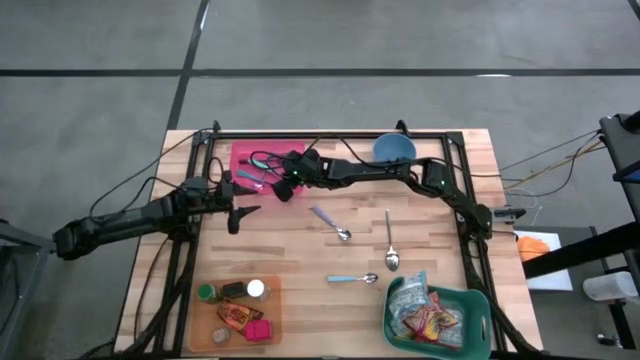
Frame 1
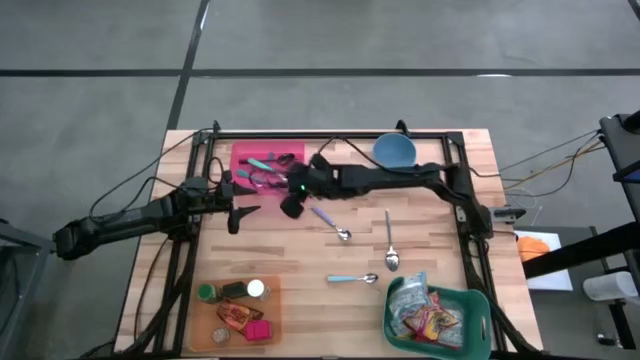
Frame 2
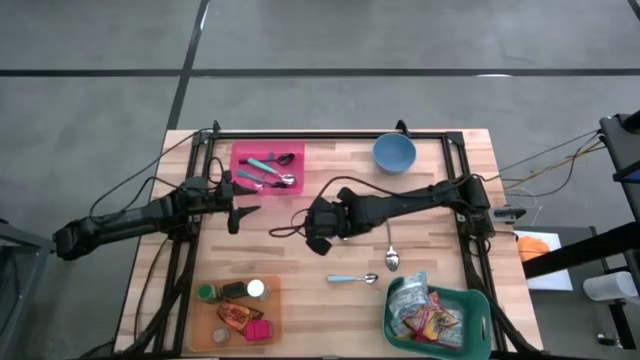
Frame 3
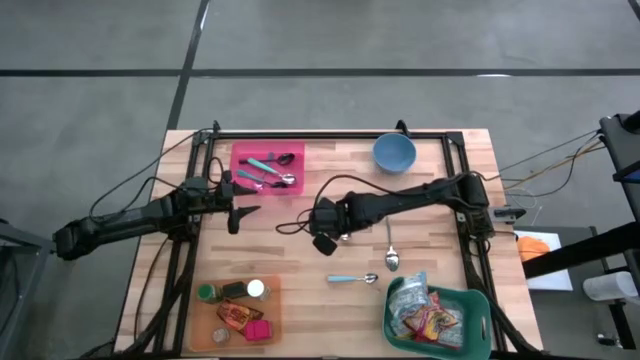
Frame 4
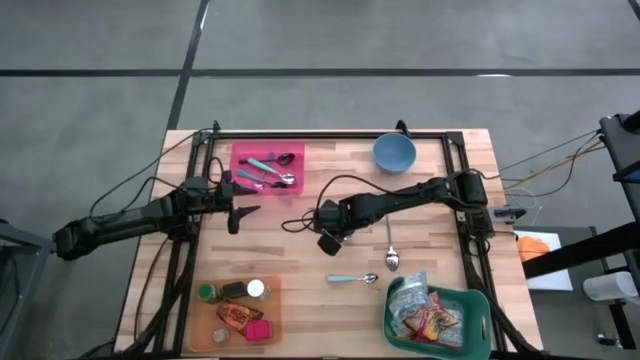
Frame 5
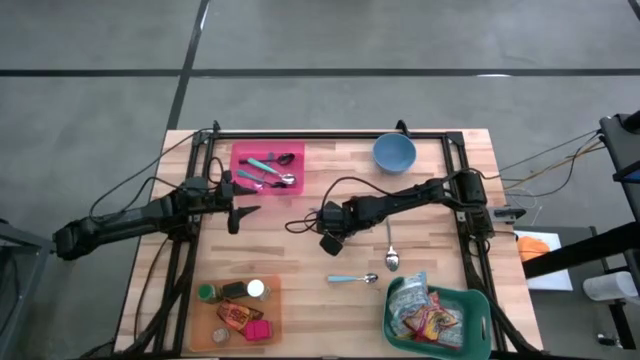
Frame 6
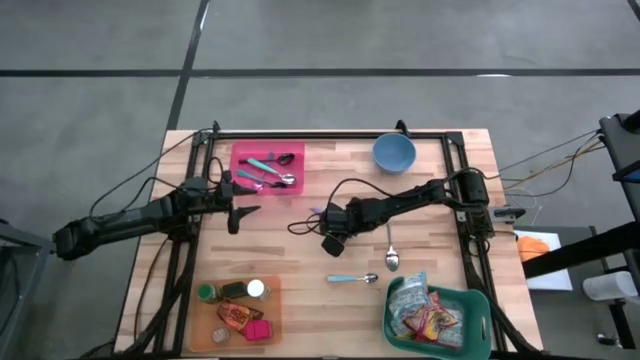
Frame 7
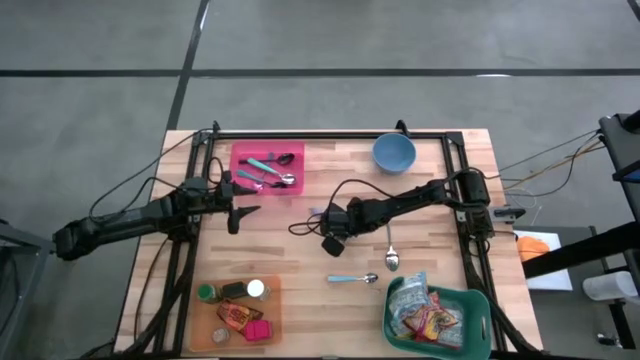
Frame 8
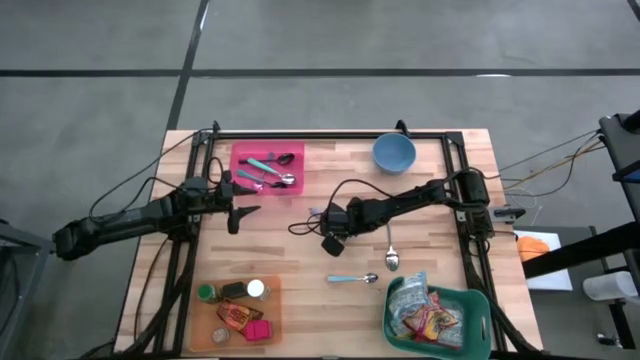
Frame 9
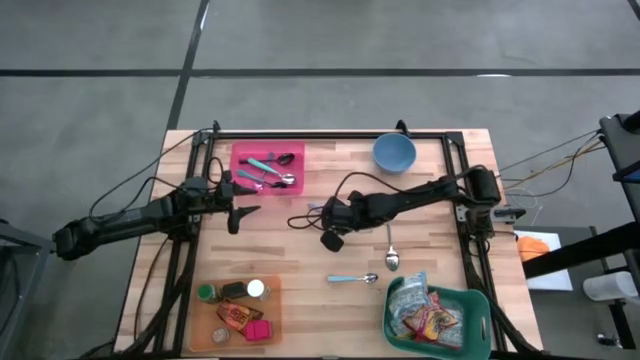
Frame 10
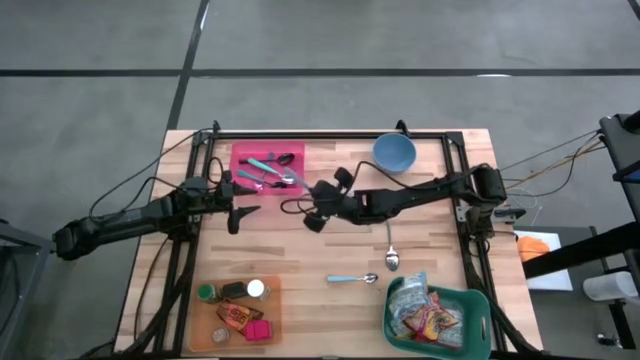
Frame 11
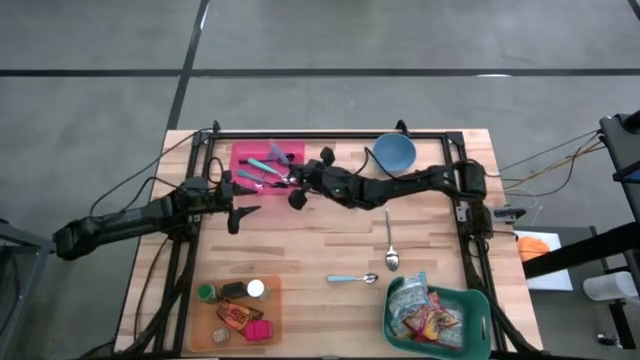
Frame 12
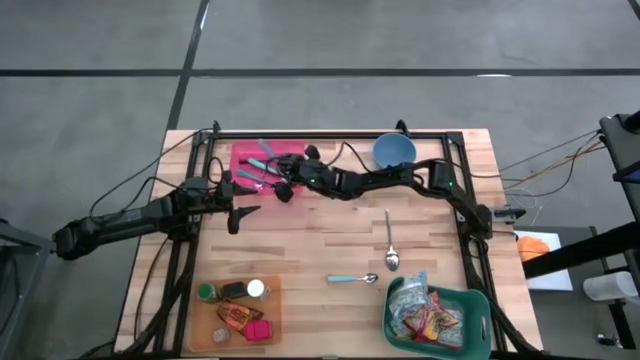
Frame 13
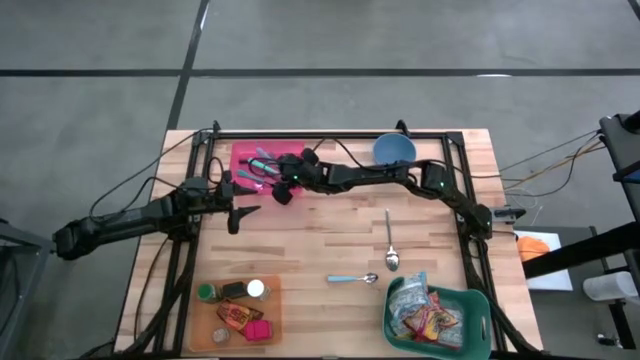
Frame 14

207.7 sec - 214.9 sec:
Put the purple spoon into the pink bin

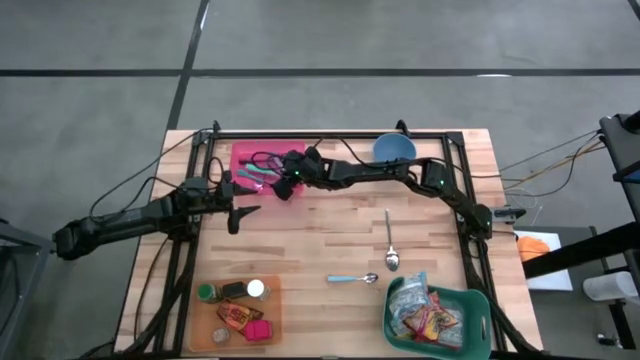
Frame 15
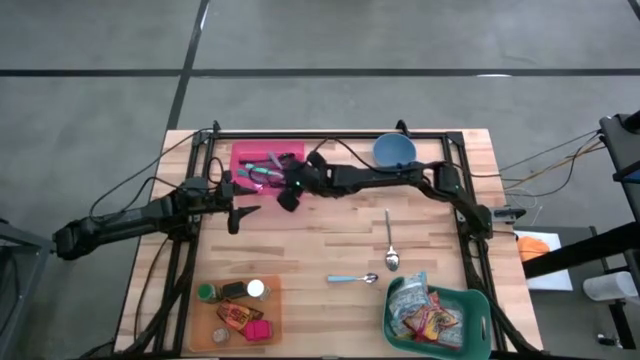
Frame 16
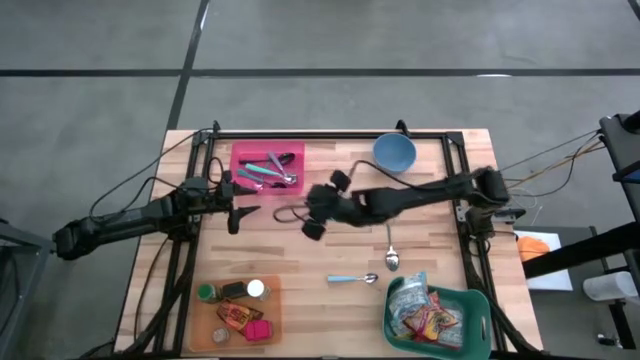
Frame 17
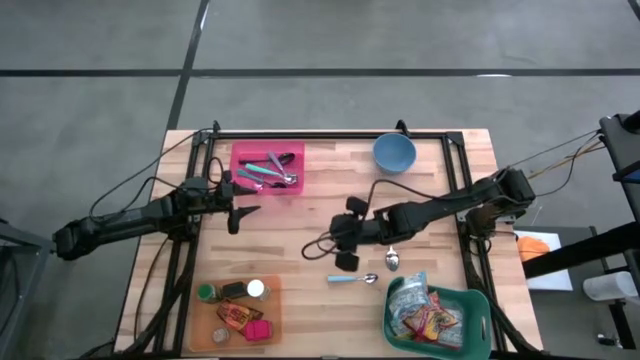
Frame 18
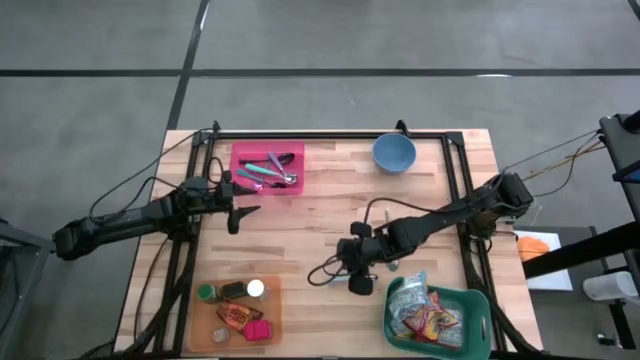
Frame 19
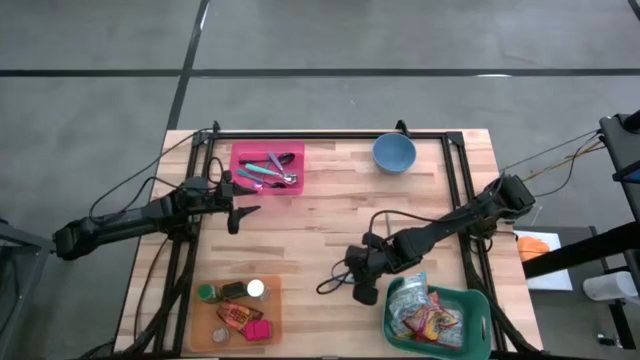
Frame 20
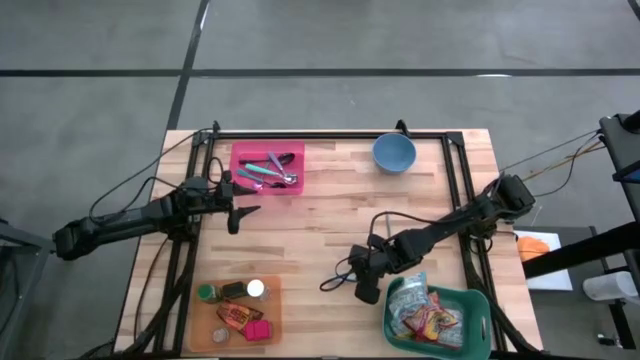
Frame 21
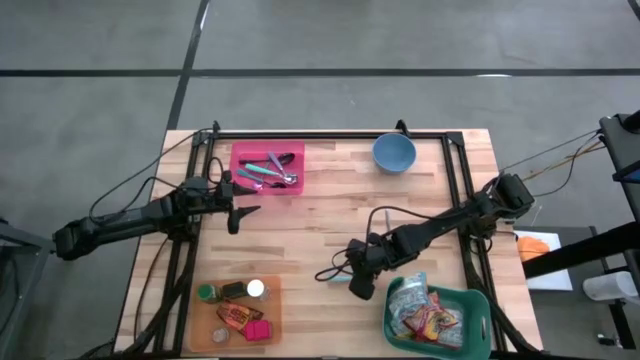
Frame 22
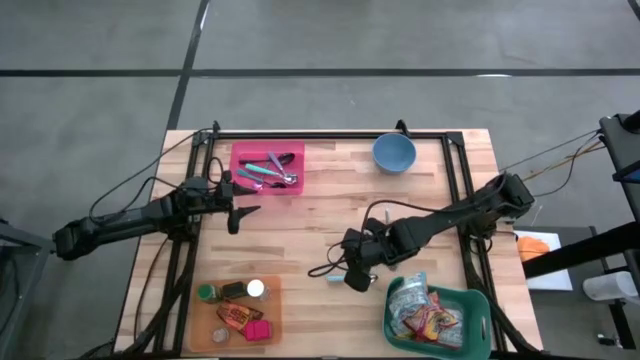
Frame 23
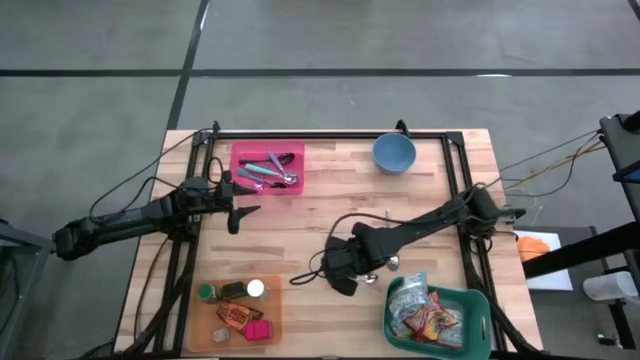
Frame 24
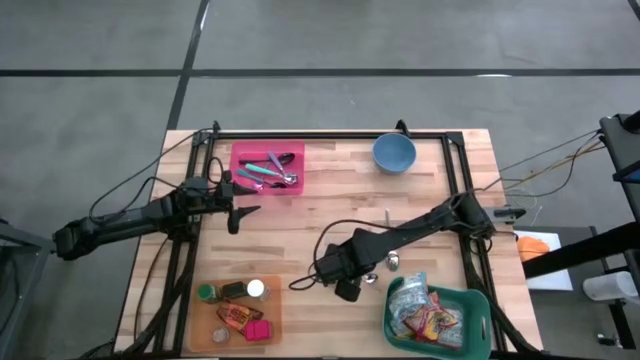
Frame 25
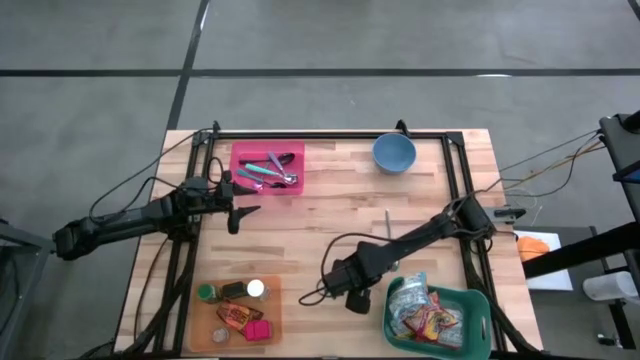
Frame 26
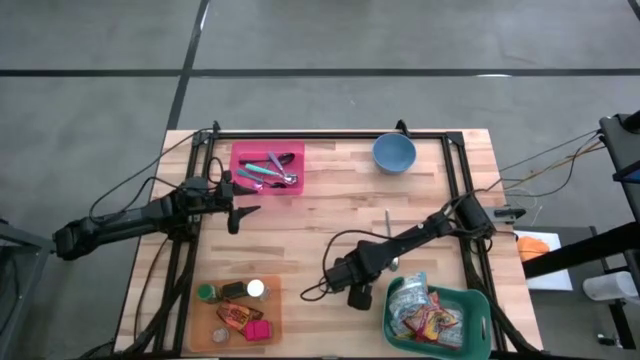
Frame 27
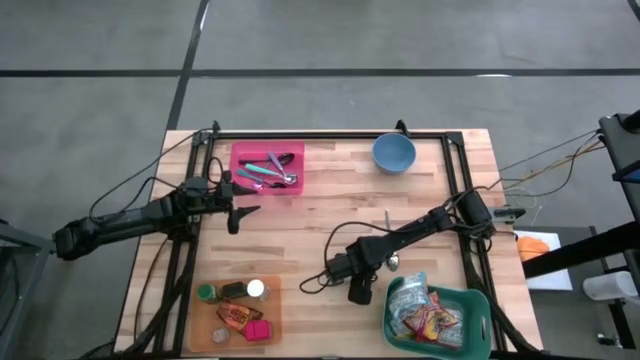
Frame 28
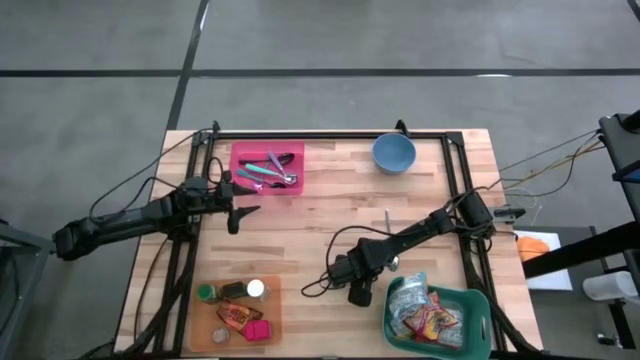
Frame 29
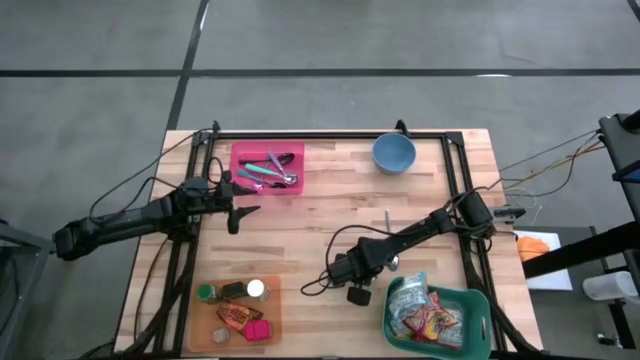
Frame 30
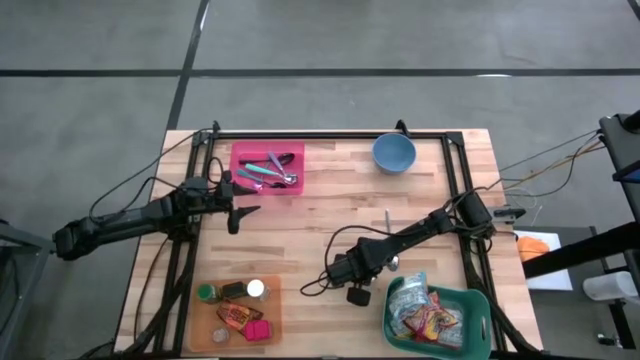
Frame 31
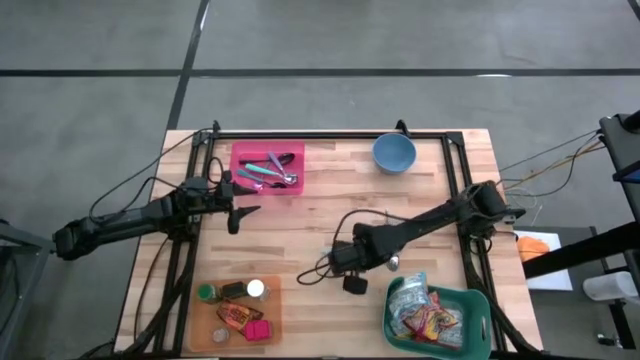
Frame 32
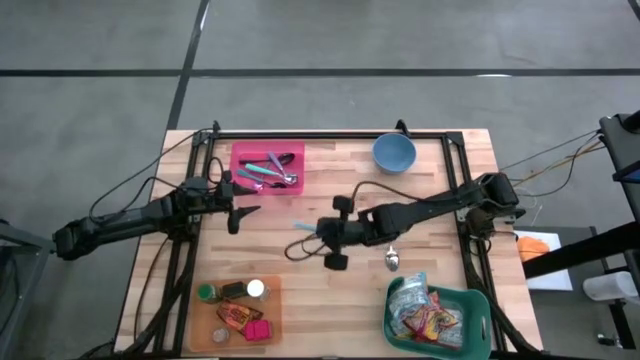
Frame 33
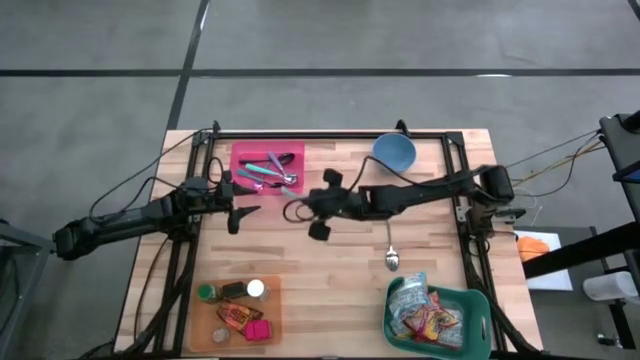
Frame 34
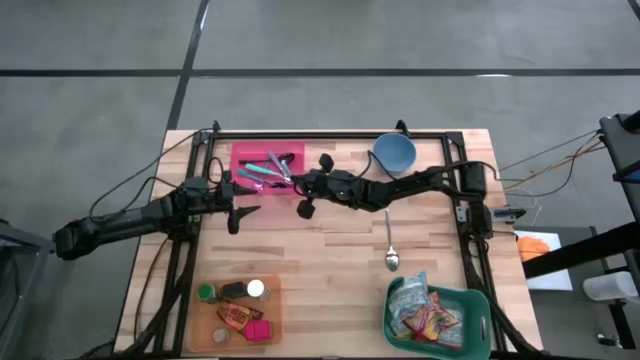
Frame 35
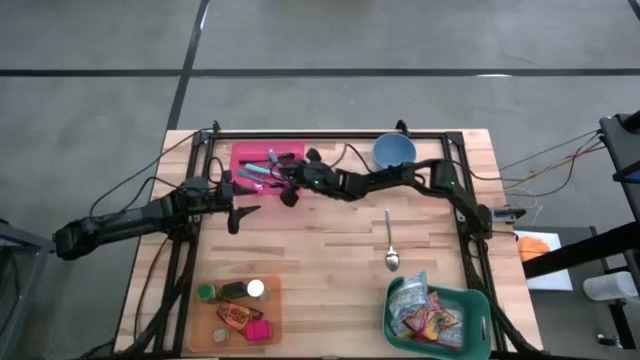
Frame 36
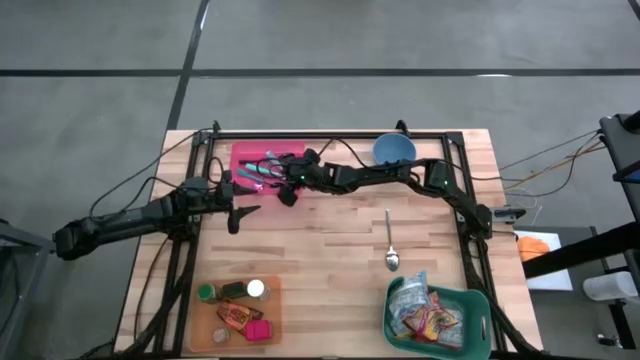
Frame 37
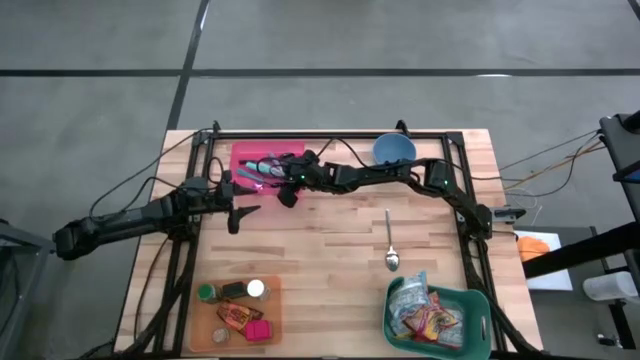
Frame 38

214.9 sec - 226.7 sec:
Put the light blue spoon into the pink bin
